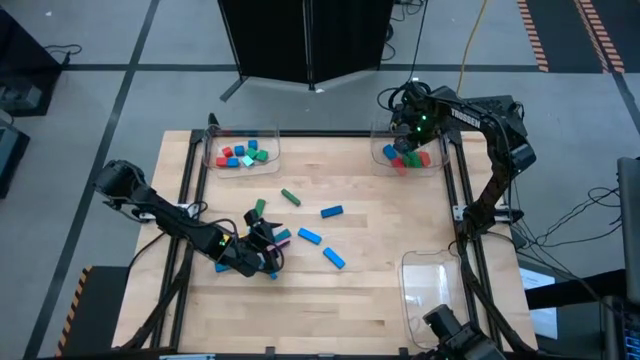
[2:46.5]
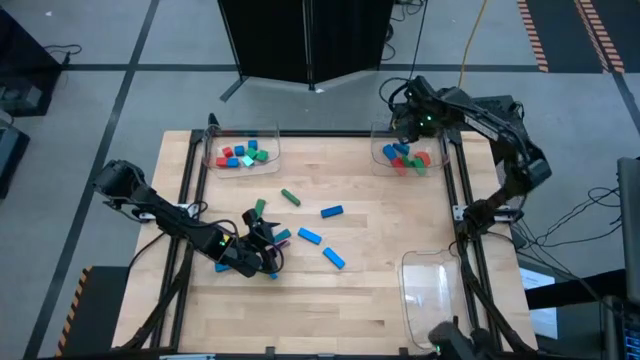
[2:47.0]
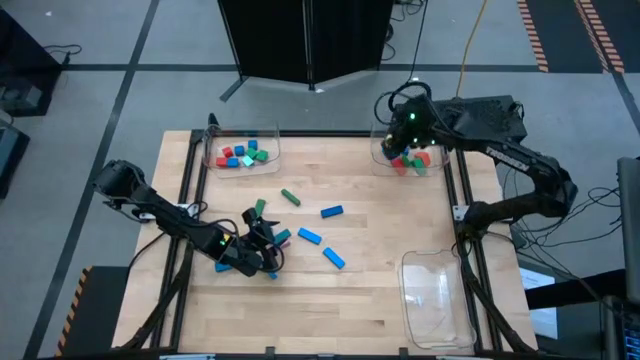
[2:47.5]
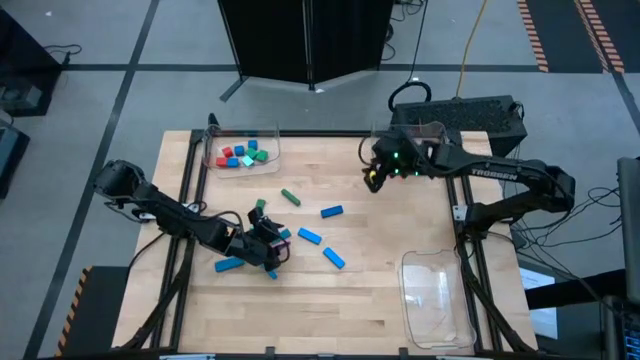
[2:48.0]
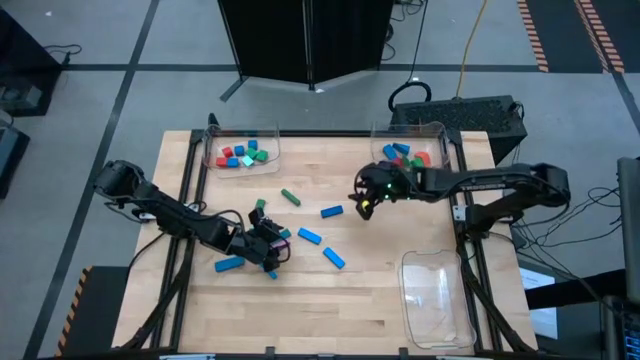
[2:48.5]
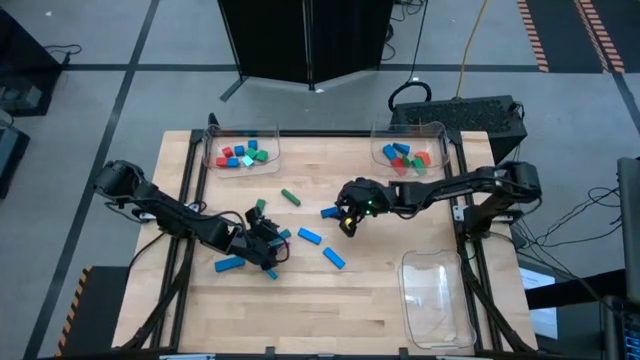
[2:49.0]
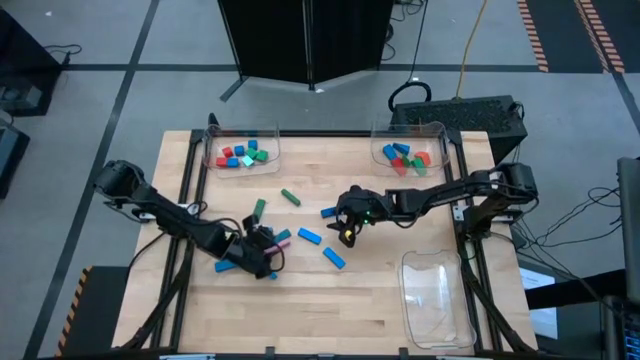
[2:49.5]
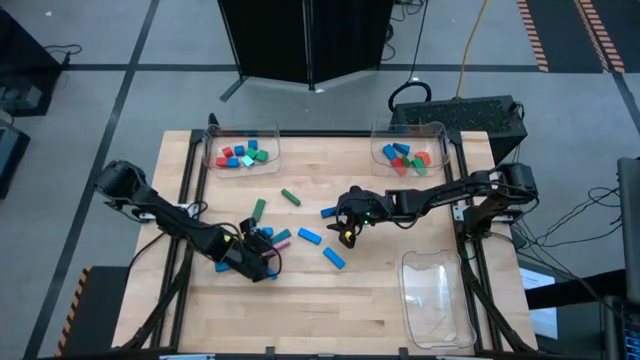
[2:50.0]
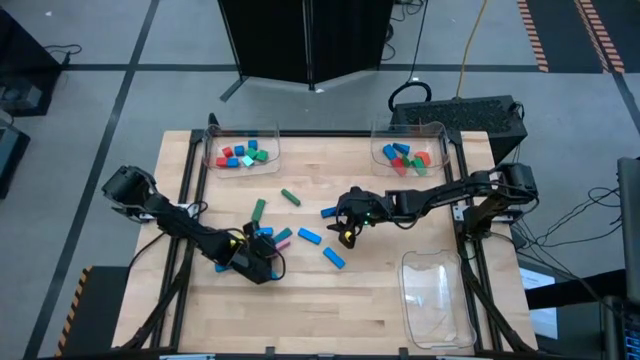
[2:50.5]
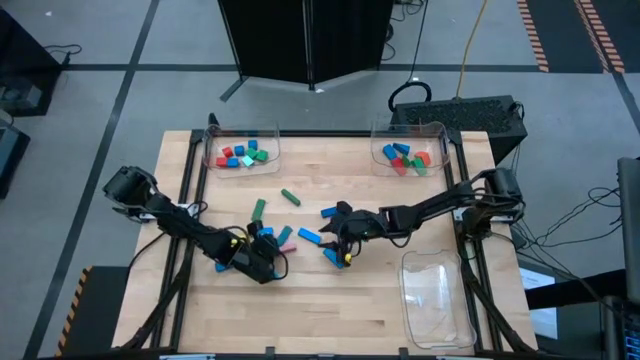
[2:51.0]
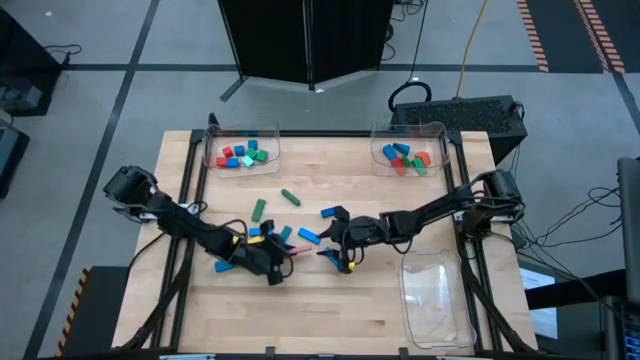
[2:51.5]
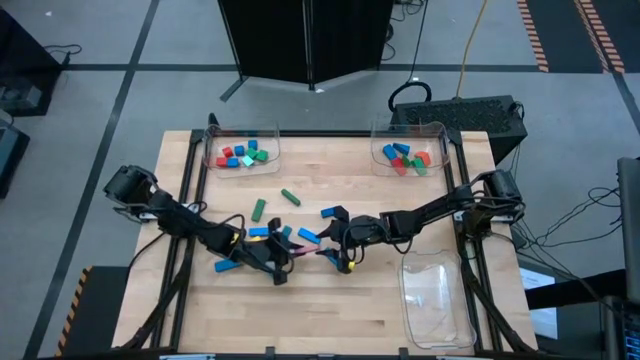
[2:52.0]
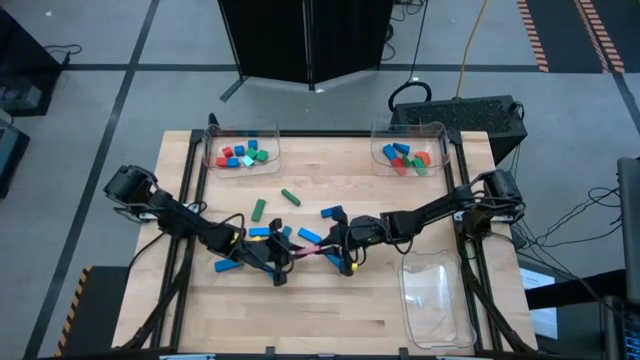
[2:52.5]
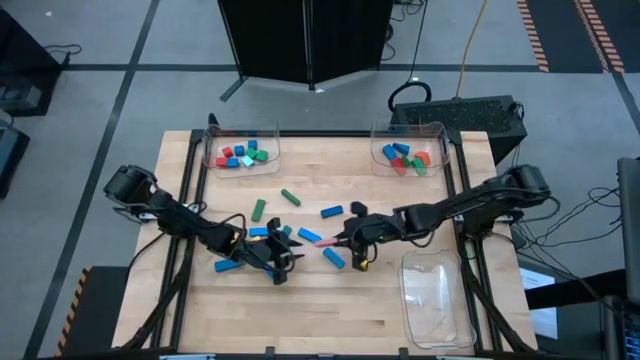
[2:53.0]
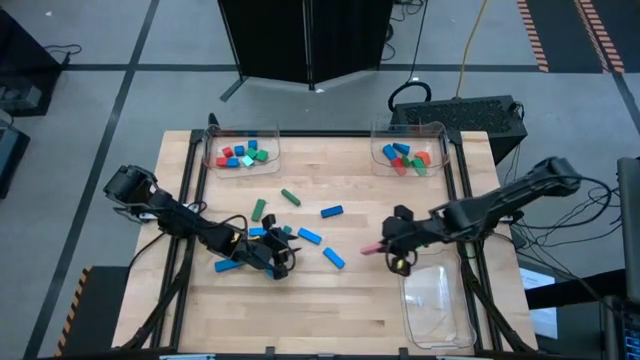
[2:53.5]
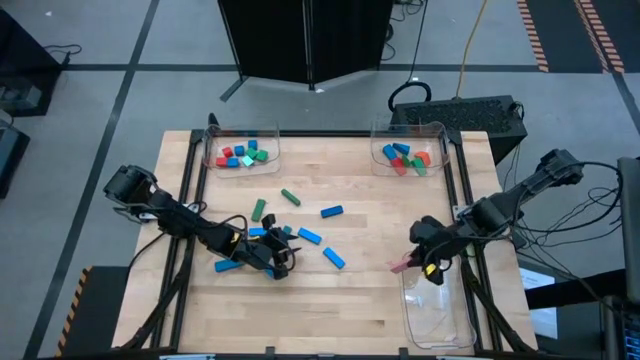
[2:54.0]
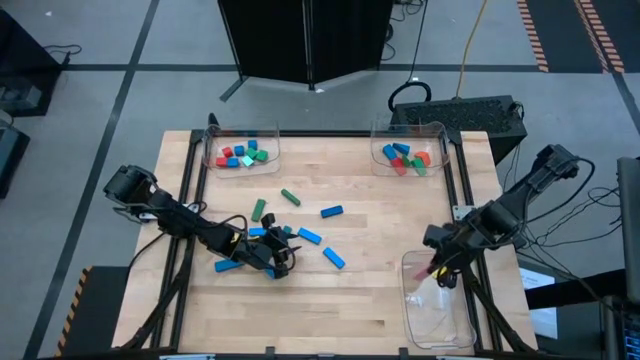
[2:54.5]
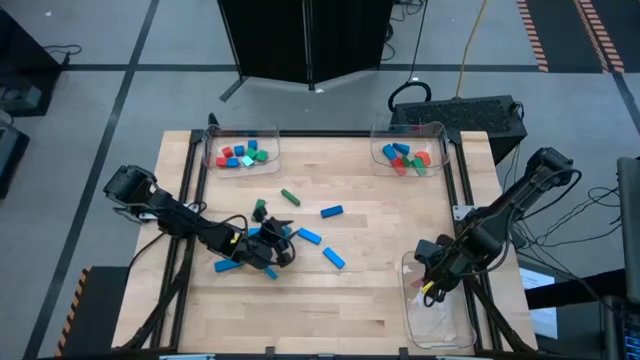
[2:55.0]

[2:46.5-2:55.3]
Task: Sort blocks by size
Put the pink rectangular block into the bottom transparent bin

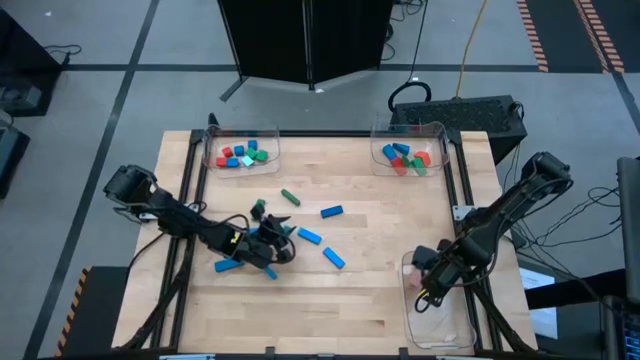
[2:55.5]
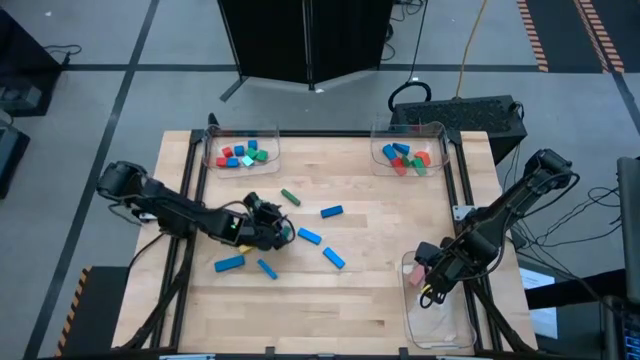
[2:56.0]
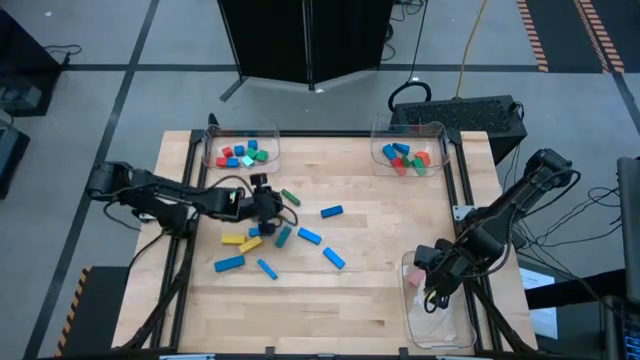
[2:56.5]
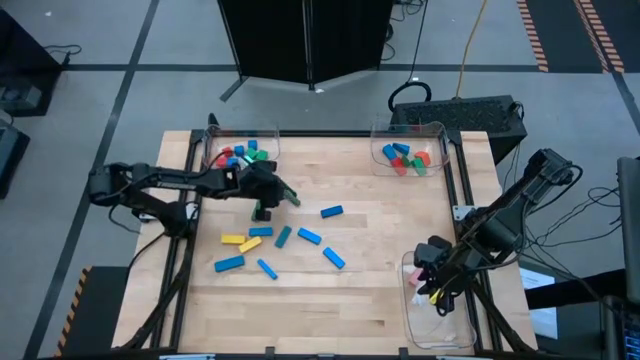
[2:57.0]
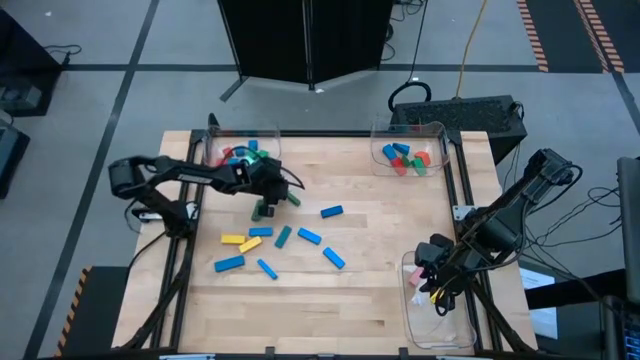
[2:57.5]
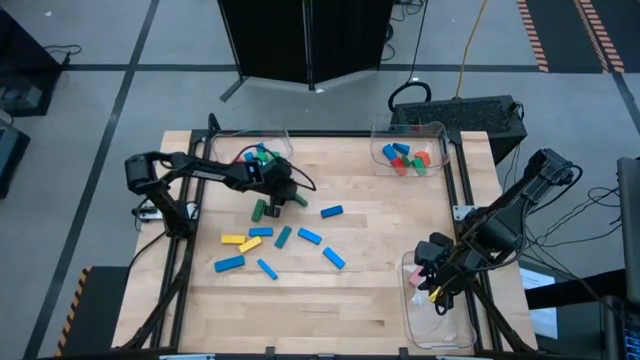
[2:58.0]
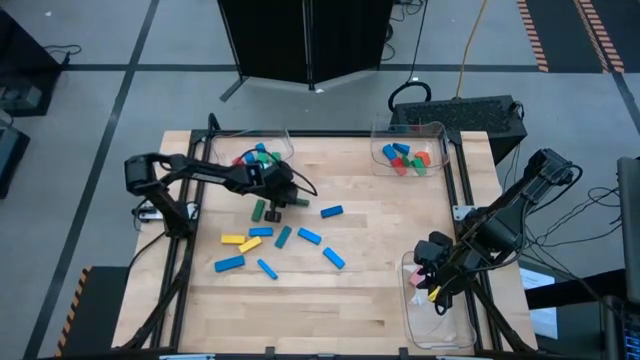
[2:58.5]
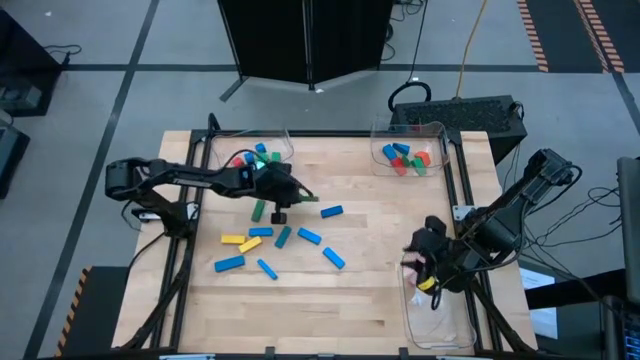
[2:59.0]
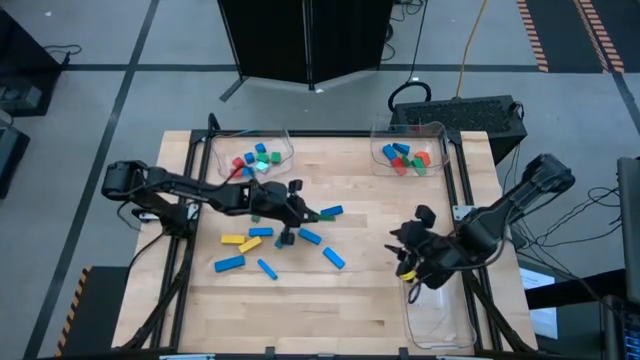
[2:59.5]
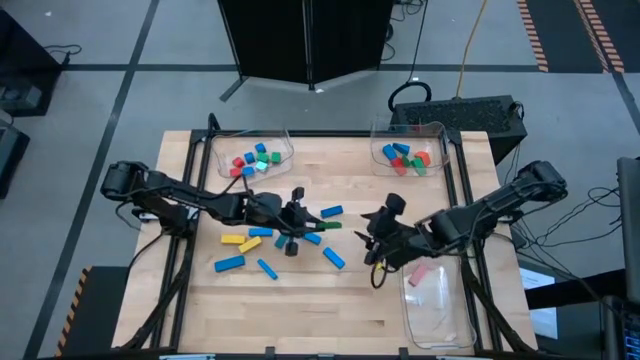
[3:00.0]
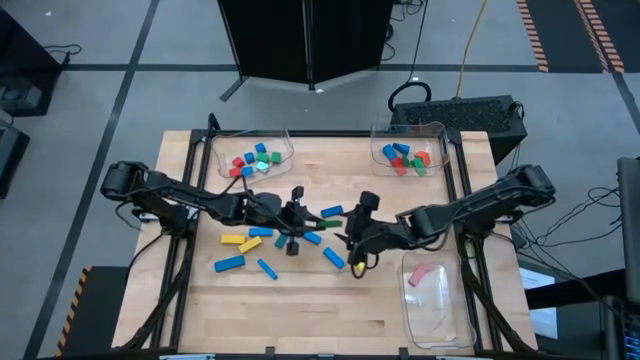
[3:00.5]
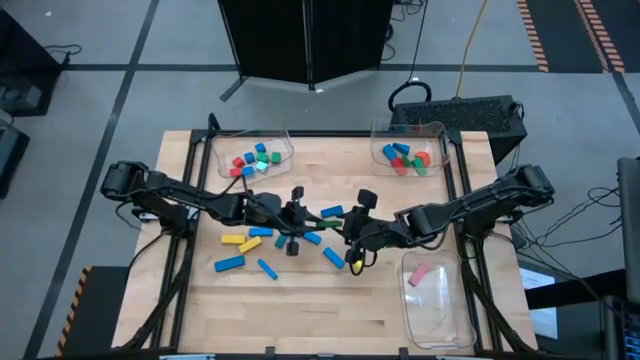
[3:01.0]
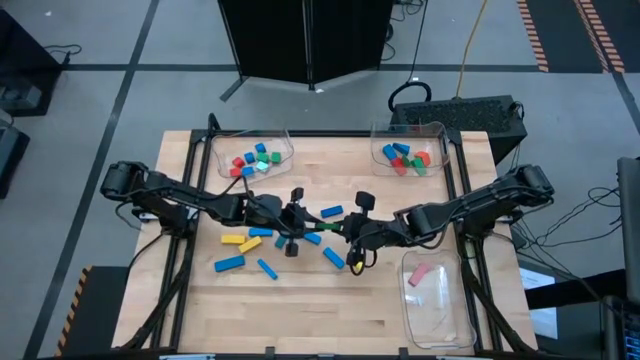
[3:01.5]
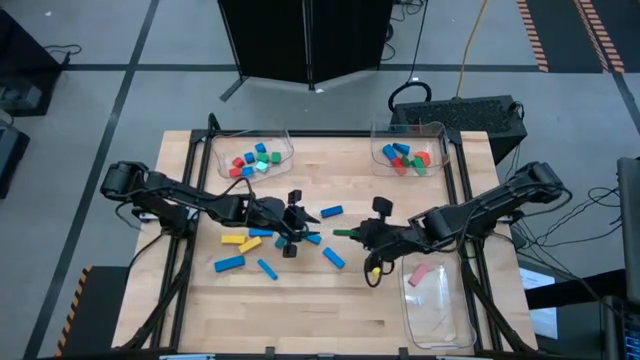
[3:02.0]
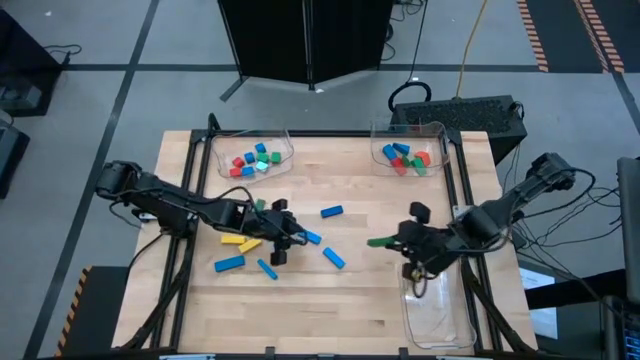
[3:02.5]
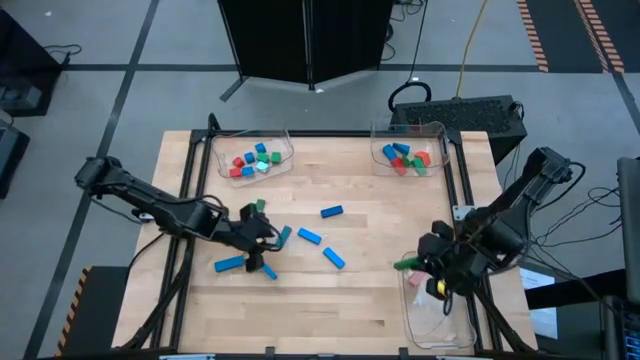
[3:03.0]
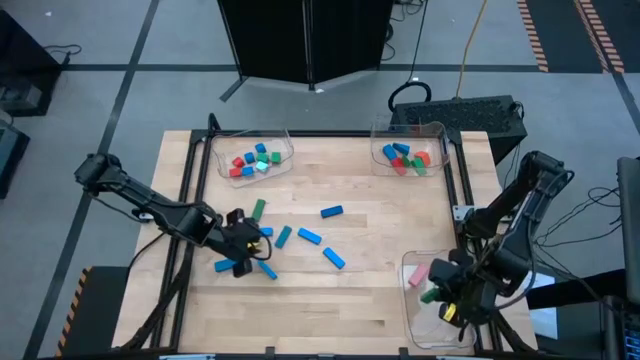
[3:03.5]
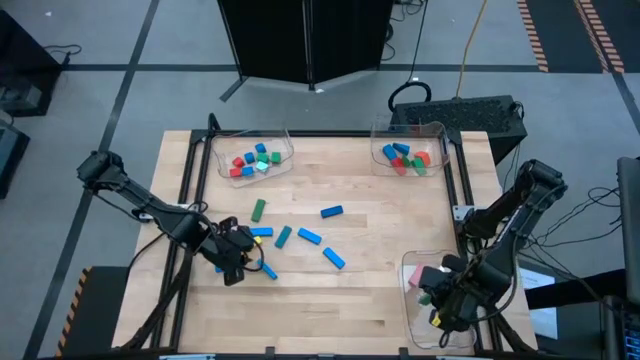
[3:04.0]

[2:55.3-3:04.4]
Put the green rectangular block into the bottom right transparent bin

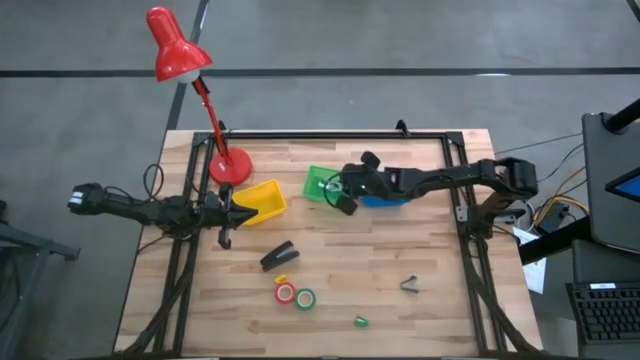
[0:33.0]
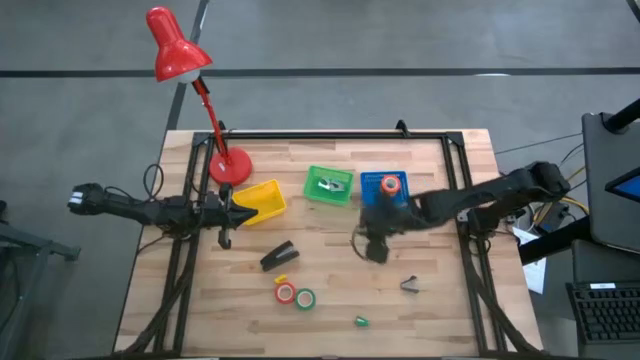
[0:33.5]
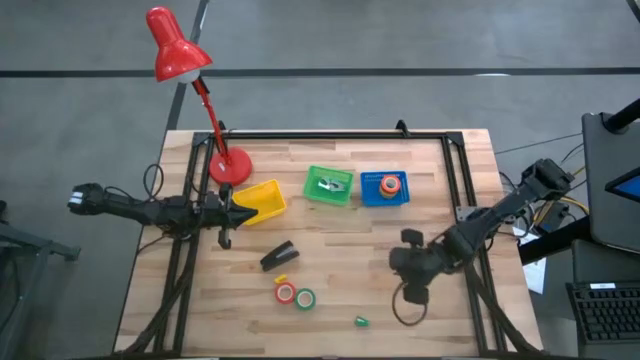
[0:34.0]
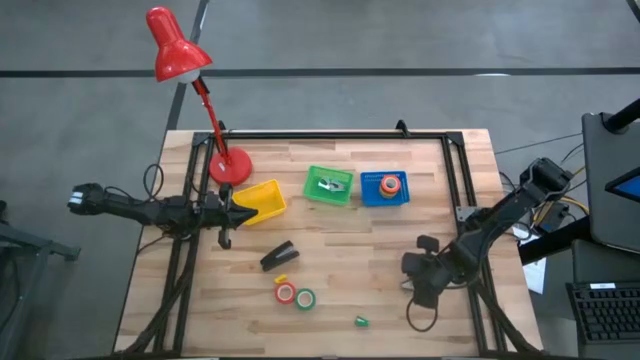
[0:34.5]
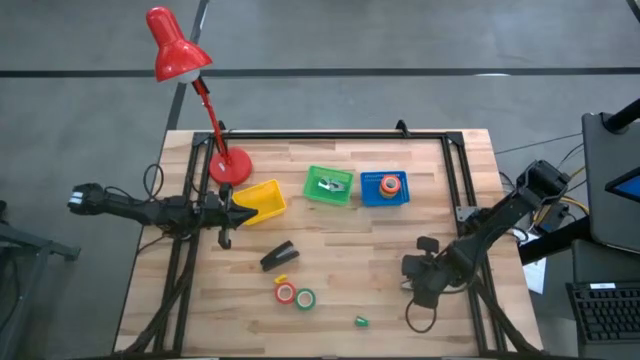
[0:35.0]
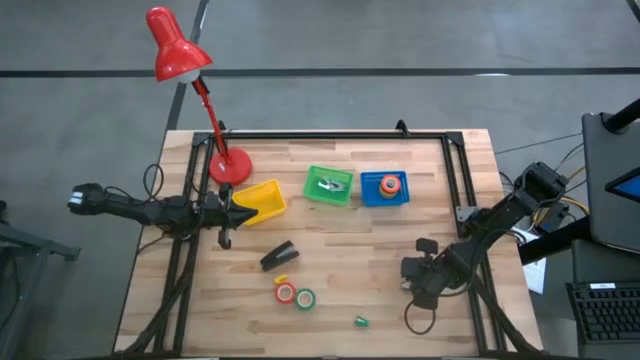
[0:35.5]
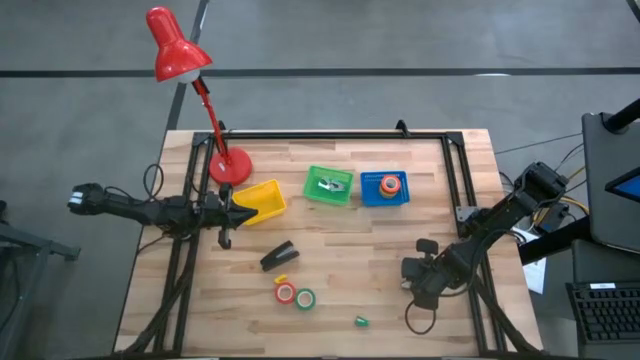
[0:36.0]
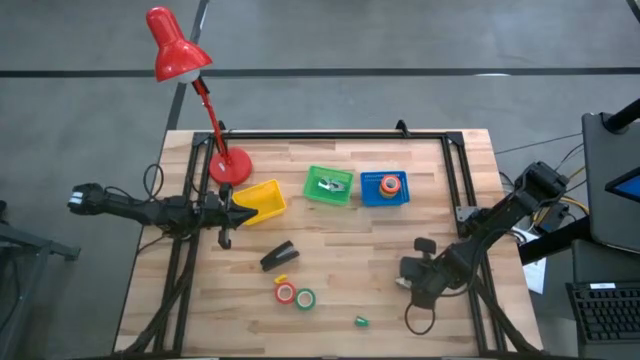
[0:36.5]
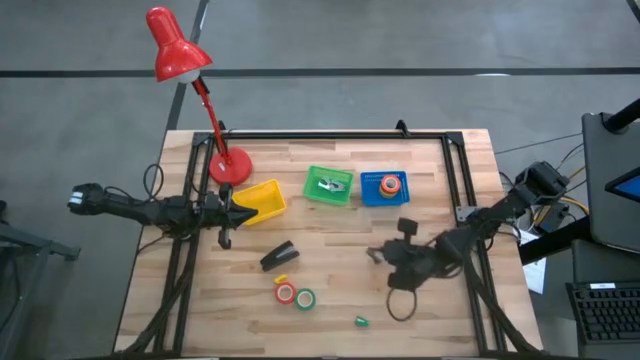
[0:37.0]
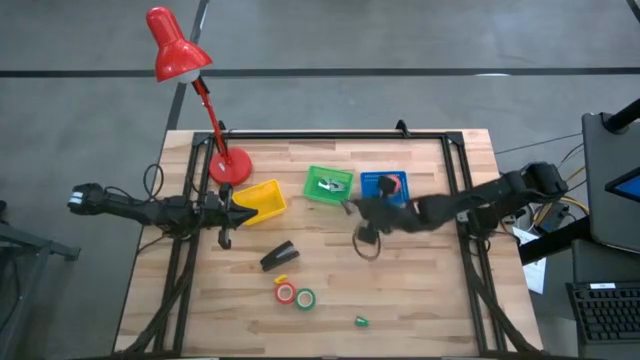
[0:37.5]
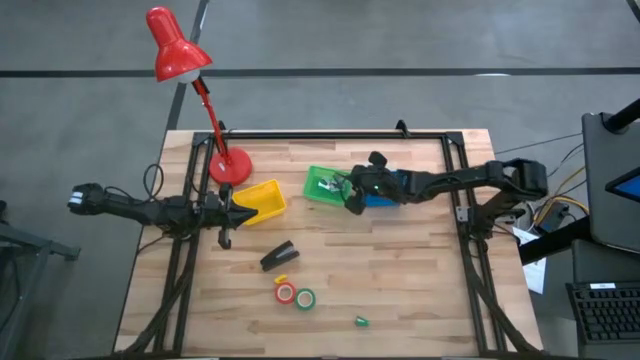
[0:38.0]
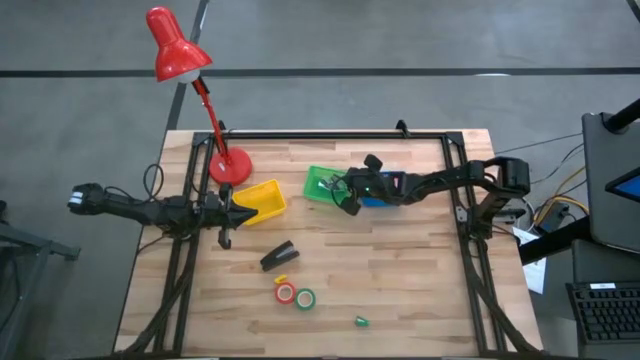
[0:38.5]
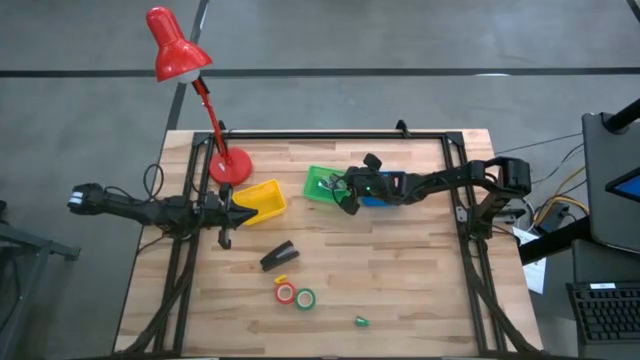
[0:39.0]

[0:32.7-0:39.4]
Task: Pick and place Stapler, Stapler remover, tape
Put the dark blue staple remover in the green basket
